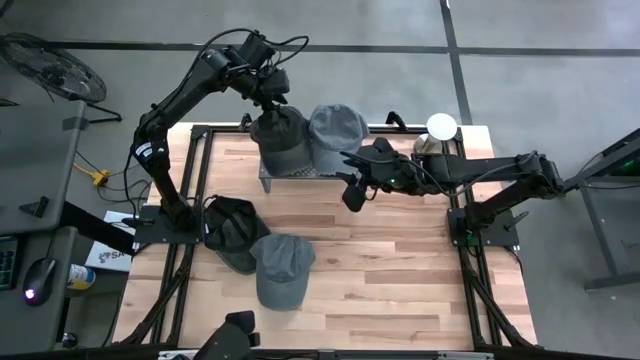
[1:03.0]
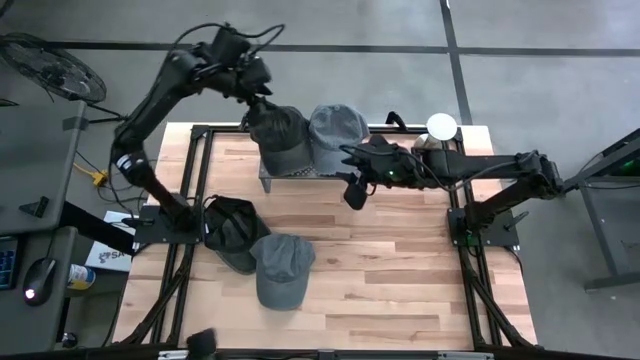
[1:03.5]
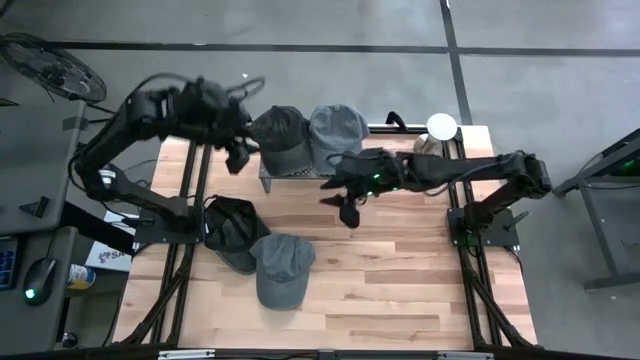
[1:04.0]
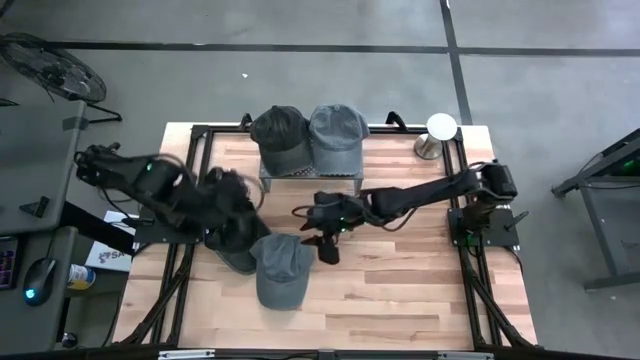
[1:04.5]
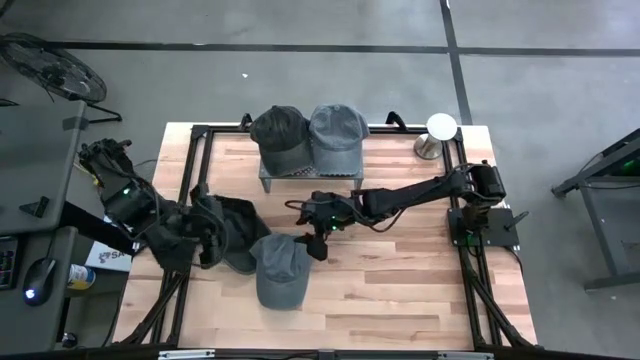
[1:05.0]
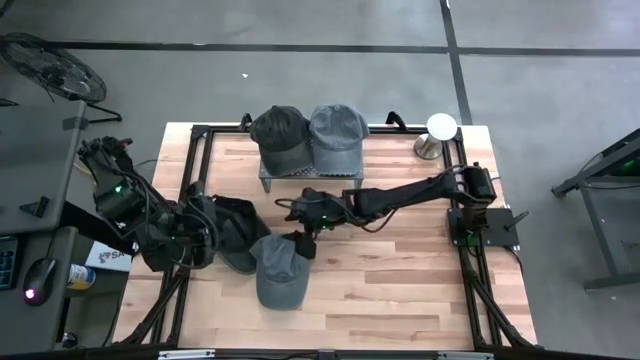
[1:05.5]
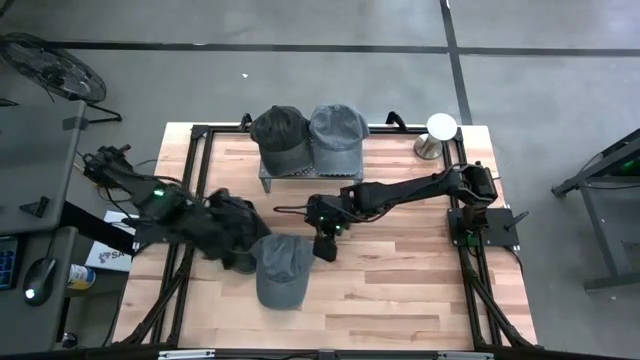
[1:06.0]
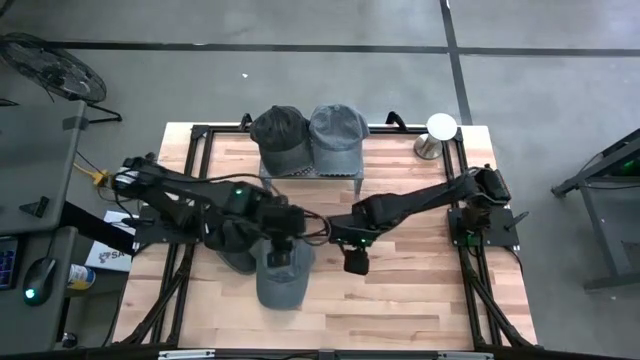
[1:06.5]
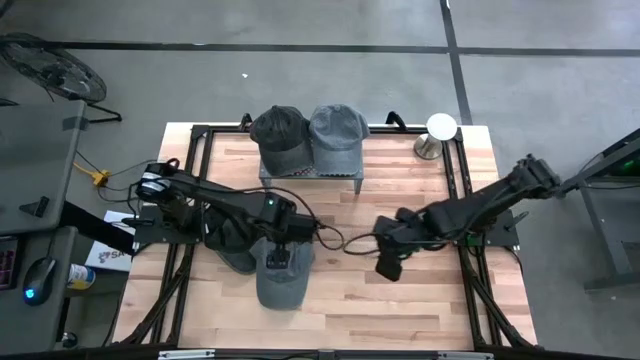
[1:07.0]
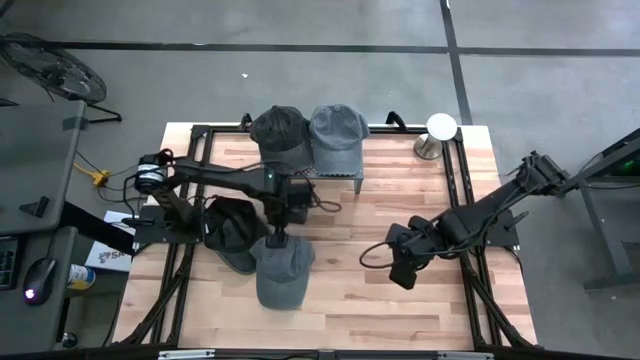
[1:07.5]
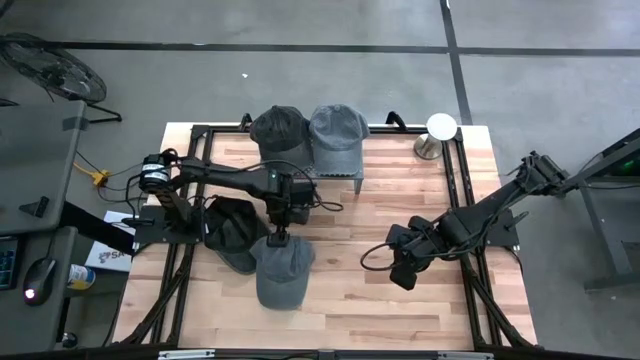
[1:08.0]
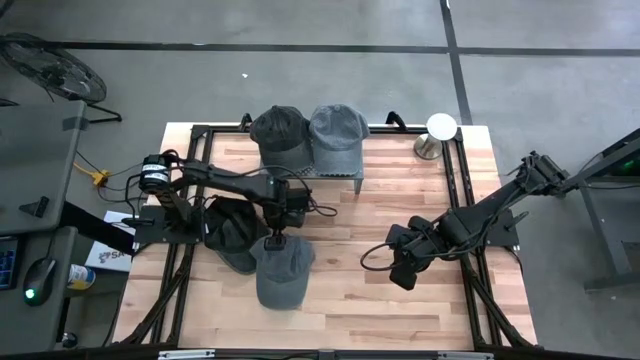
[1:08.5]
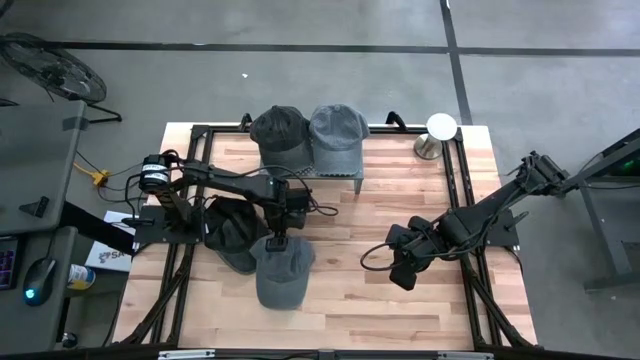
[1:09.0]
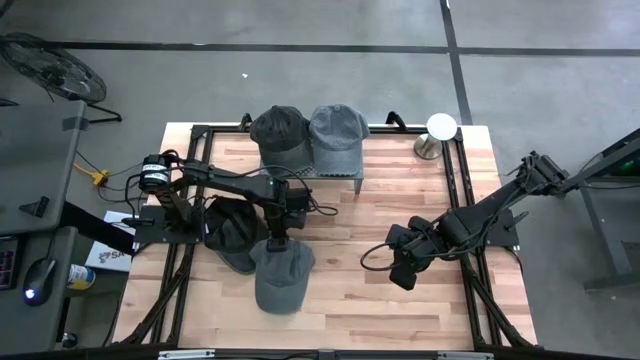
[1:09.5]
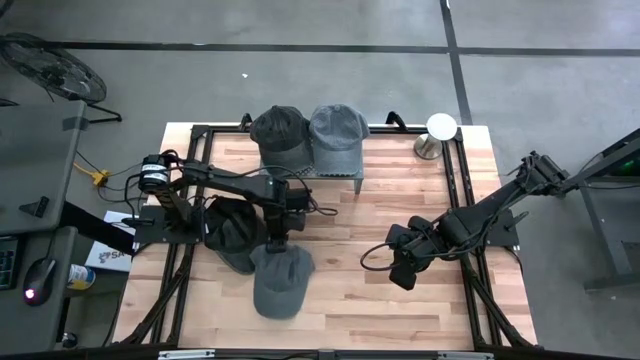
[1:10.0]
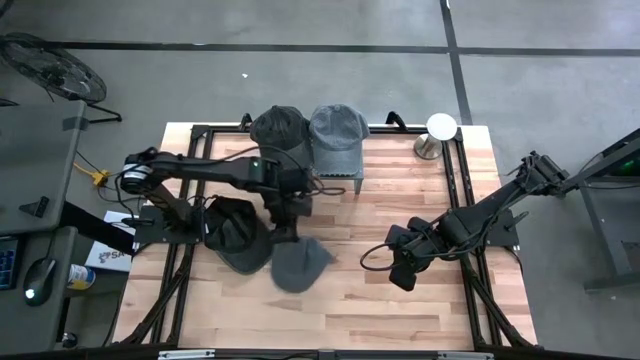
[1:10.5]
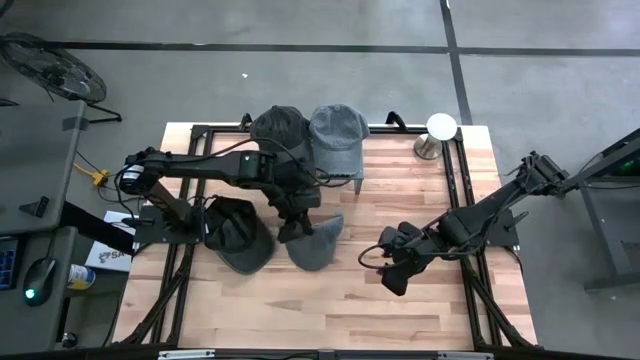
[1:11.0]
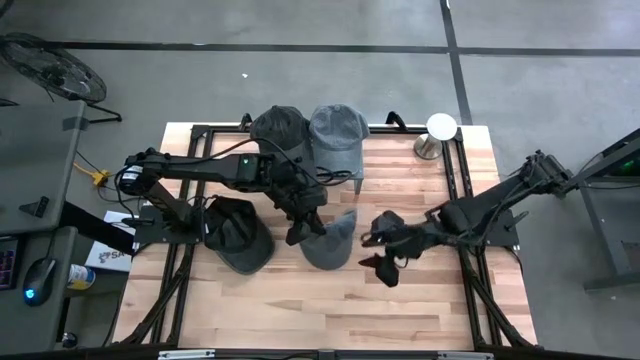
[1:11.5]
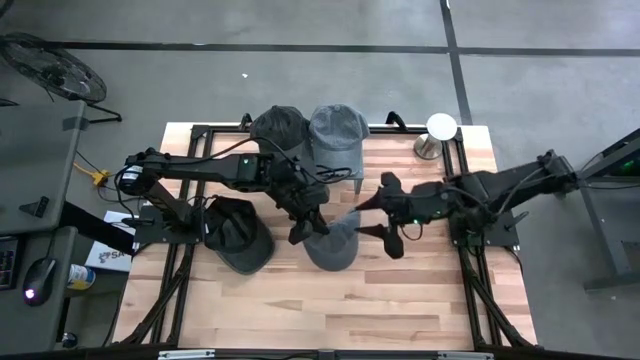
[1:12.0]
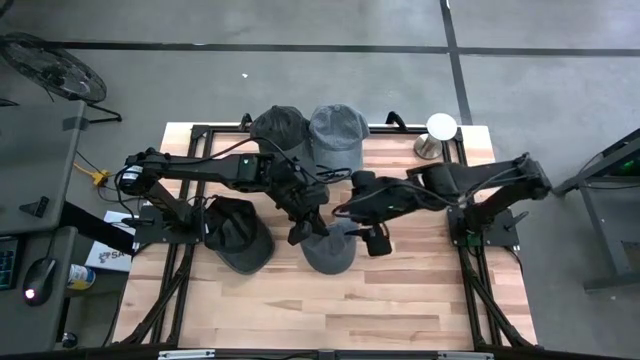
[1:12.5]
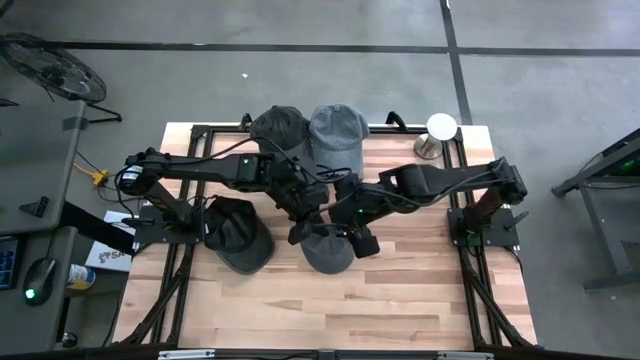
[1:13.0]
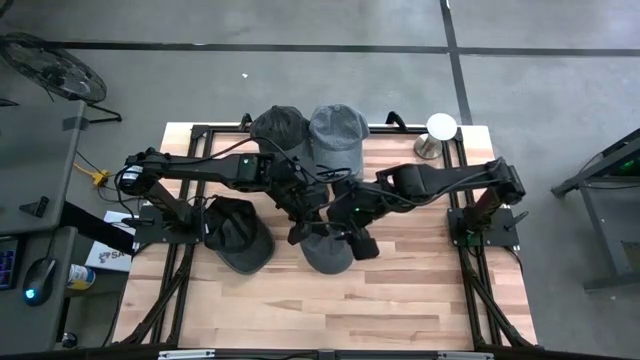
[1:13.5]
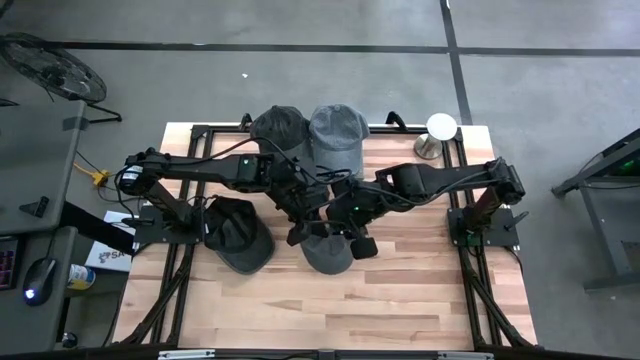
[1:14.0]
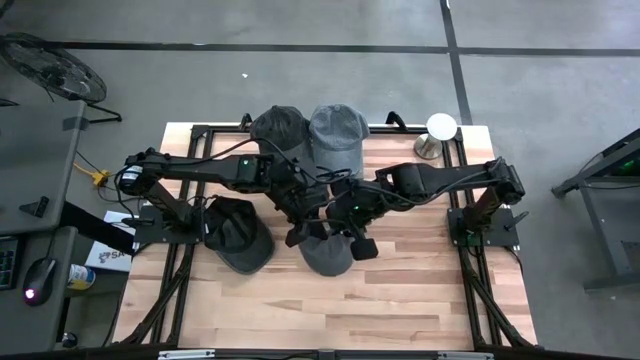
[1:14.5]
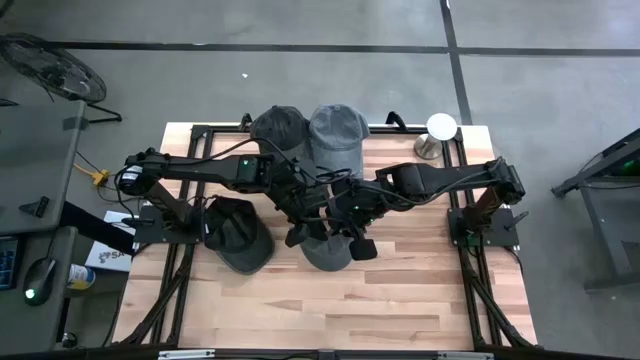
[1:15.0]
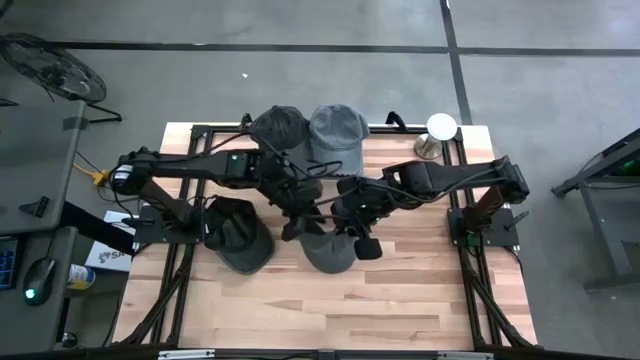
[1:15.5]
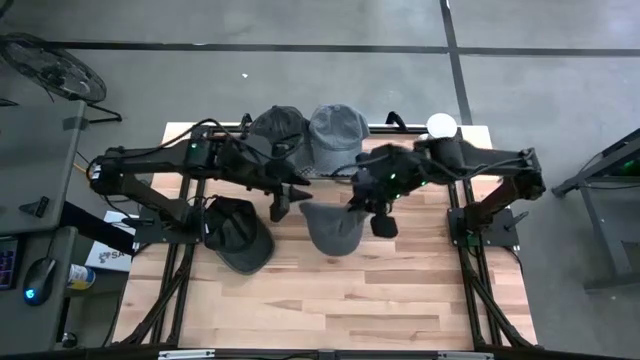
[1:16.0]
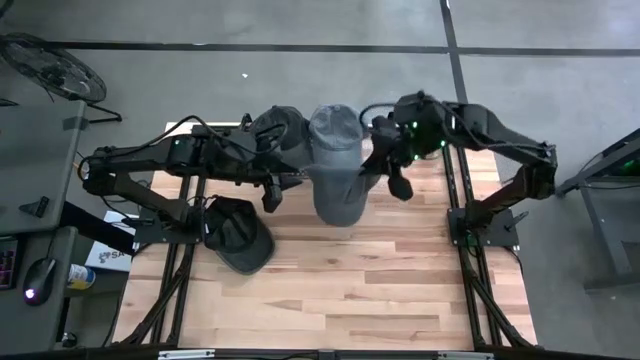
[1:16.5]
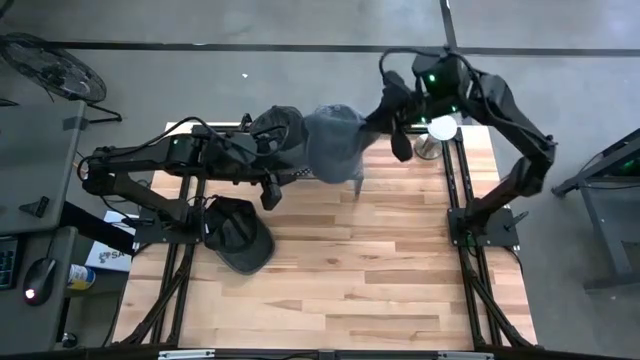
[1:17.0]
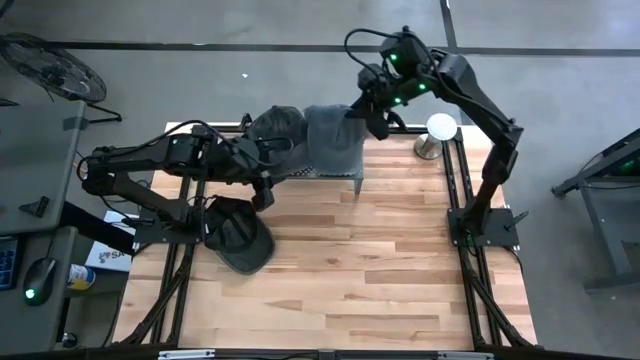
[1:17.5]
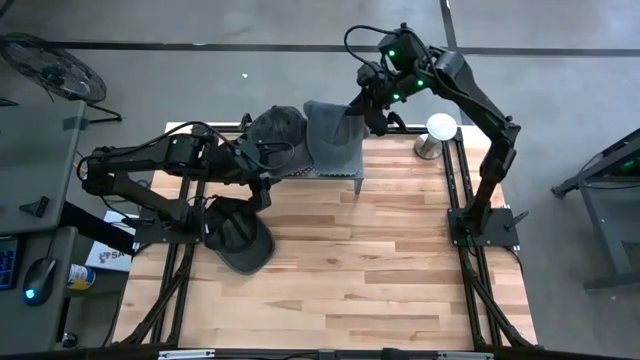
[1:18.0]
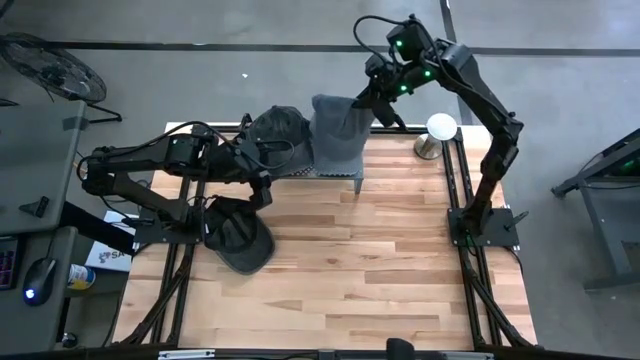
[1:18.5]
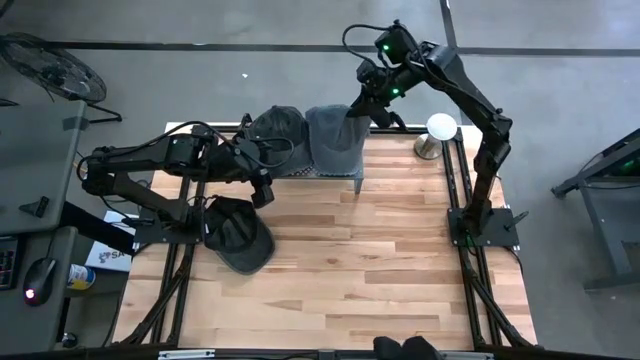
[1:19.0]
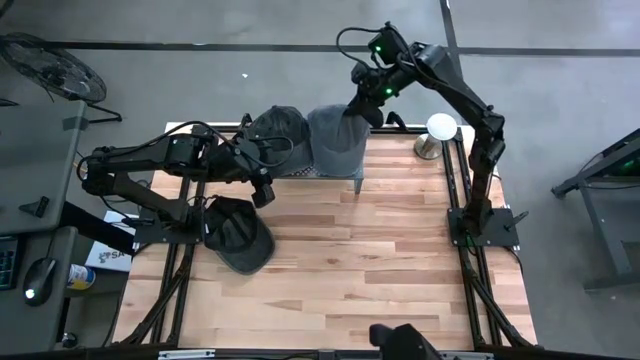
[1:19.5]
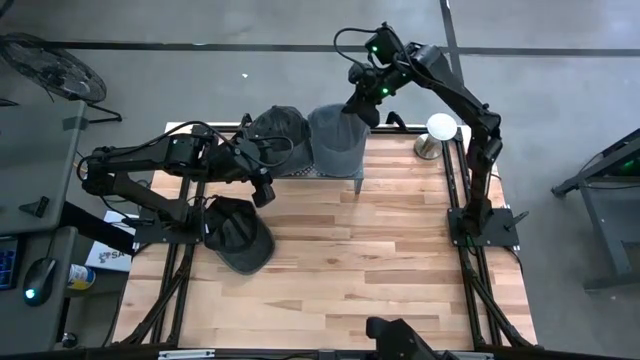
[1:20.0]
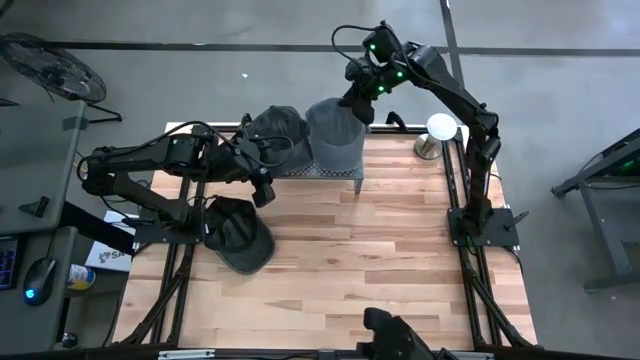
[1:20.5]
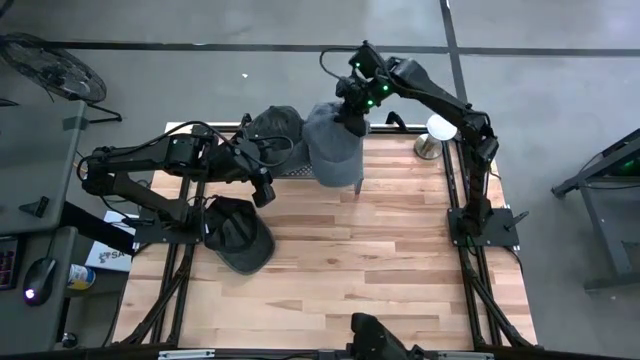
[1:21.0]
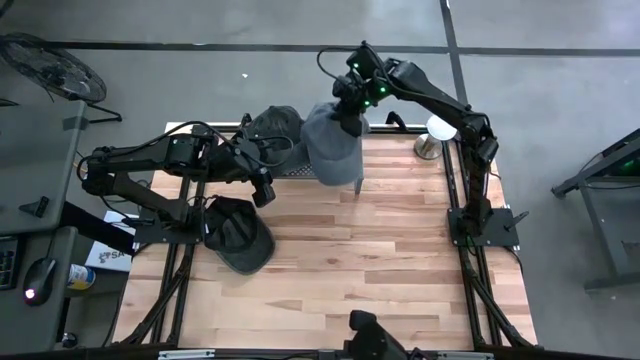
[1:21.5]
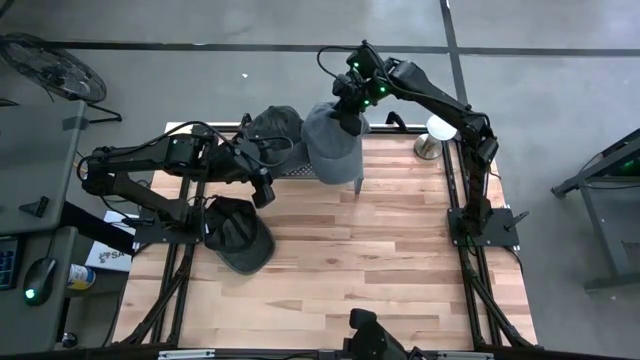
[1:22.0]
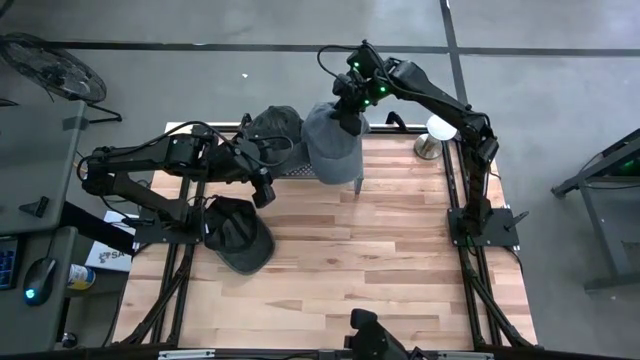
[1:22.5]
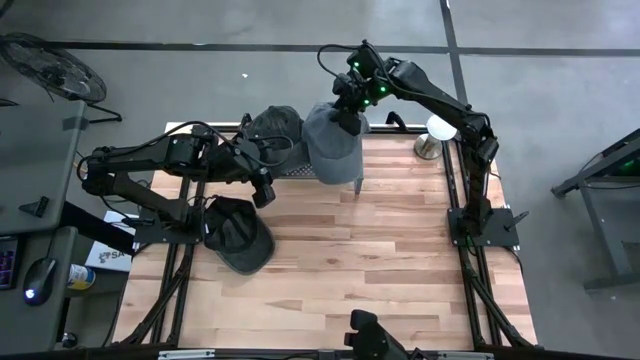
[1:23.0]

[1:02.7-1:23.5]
Task: Pick & Place hat
Stack the gray cap on top of the gray cap on the shelf

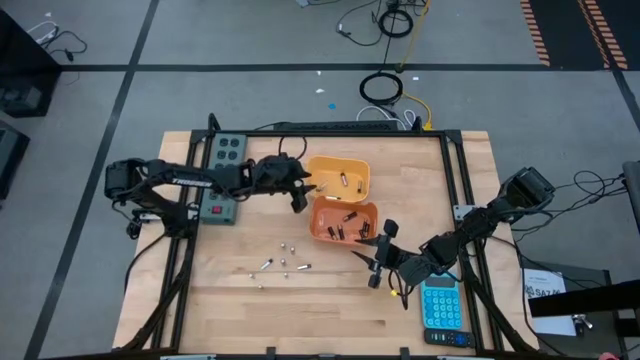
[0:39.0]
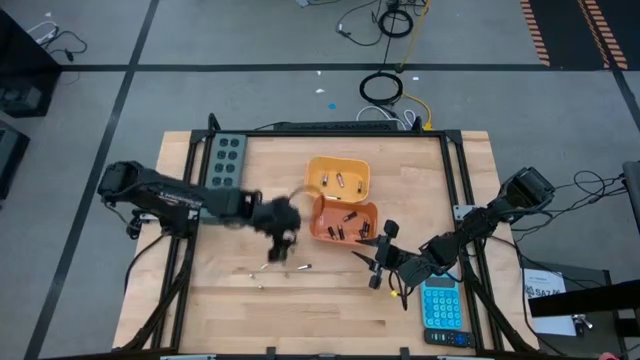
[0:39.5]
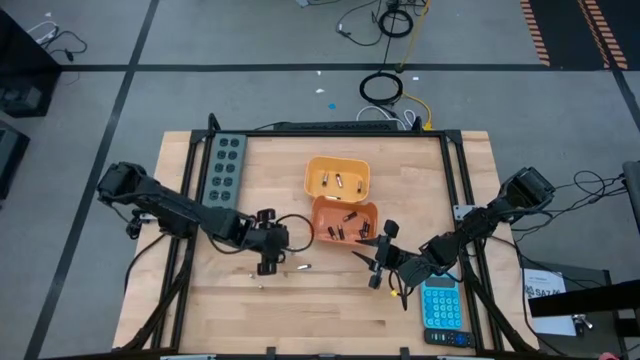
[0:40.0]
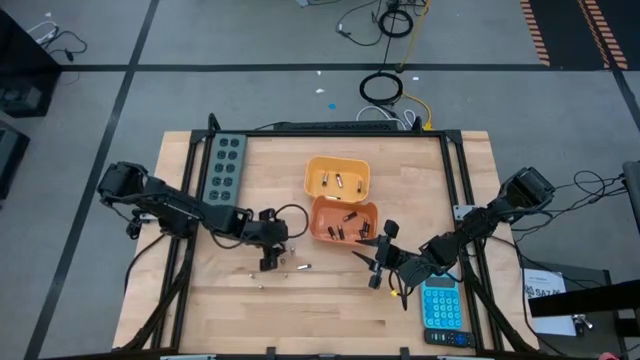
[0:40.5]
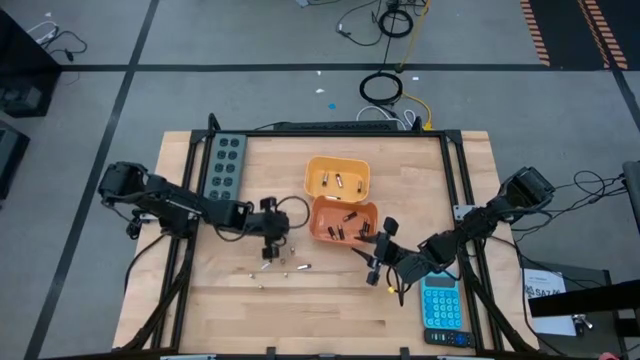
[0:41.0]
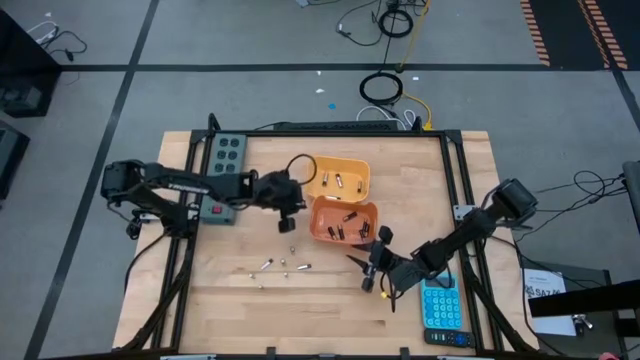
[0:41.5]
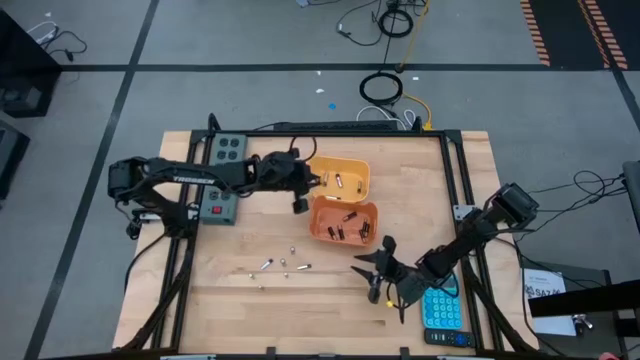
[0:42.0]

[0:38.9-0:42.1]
Task: Sort batteries
Put the silver battery into the yellow bin
